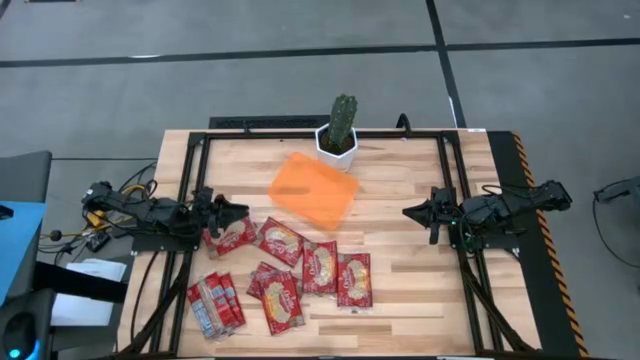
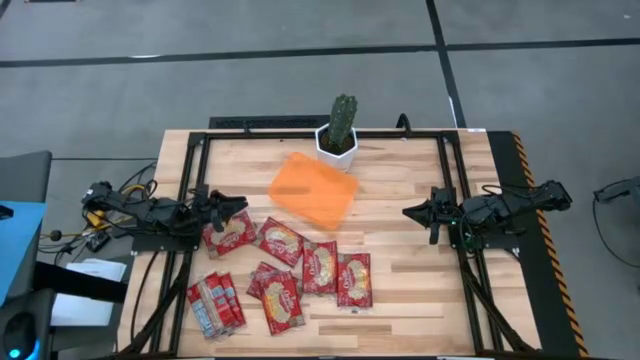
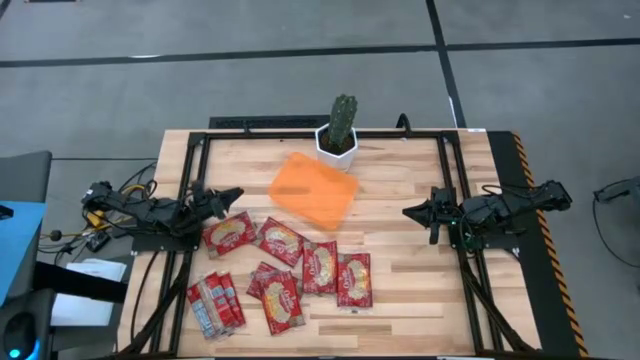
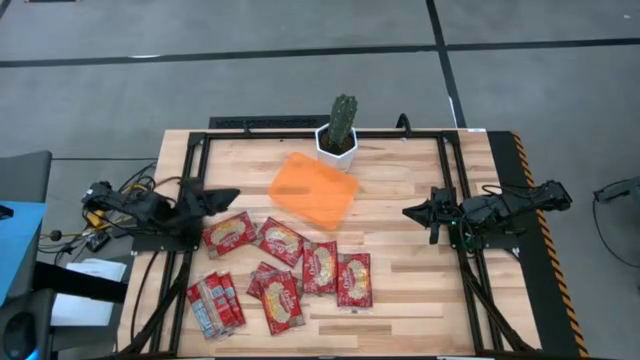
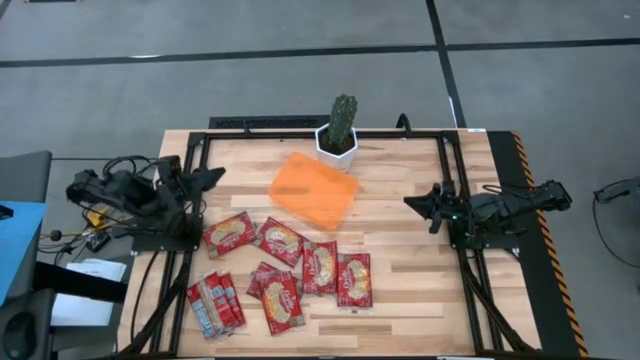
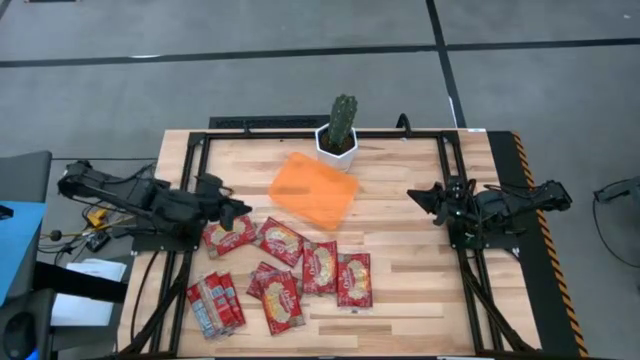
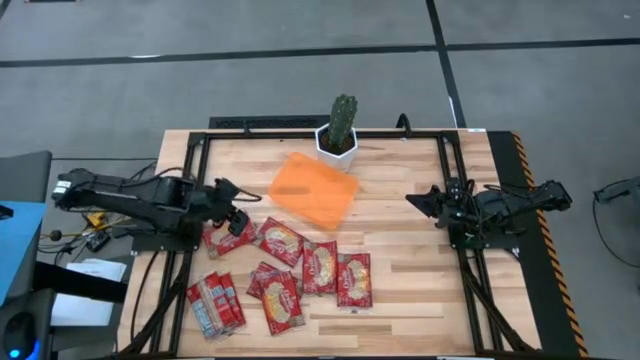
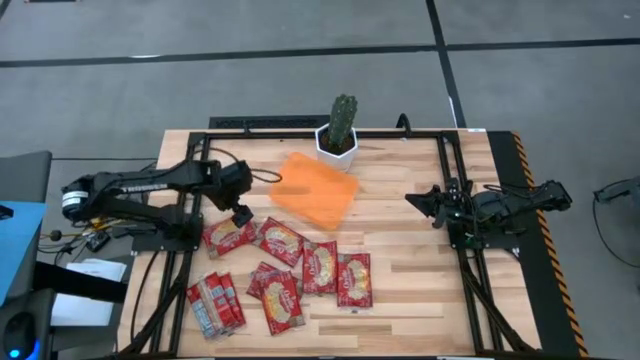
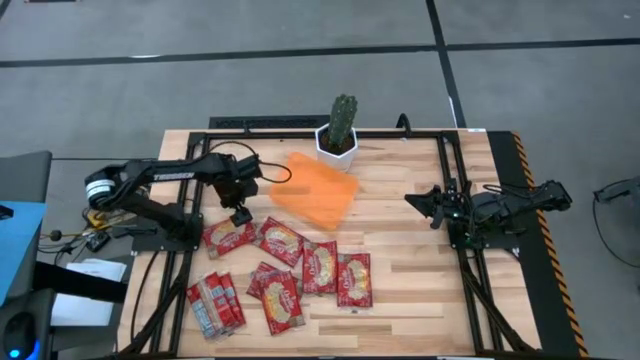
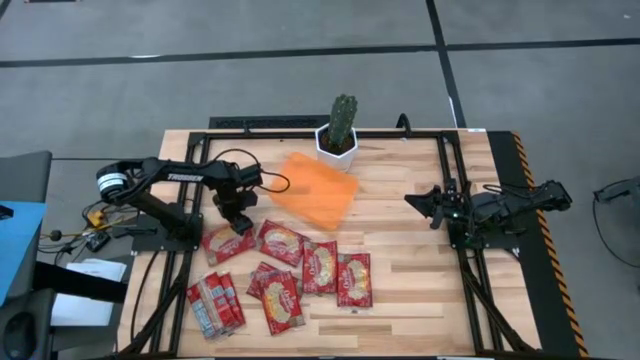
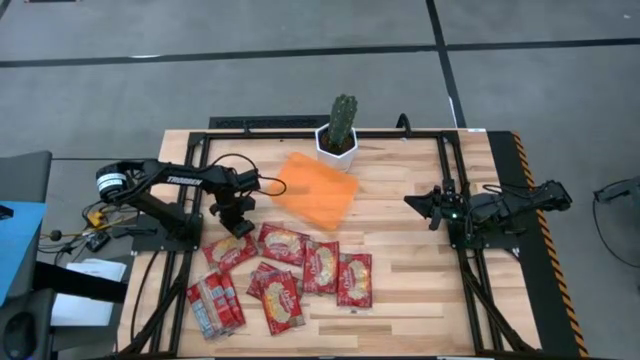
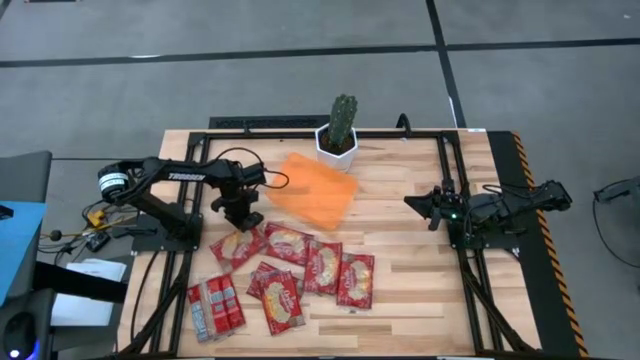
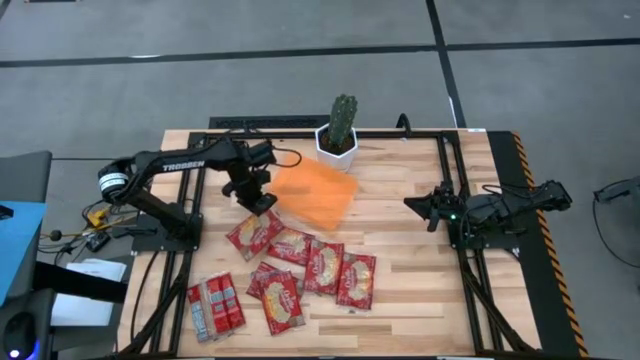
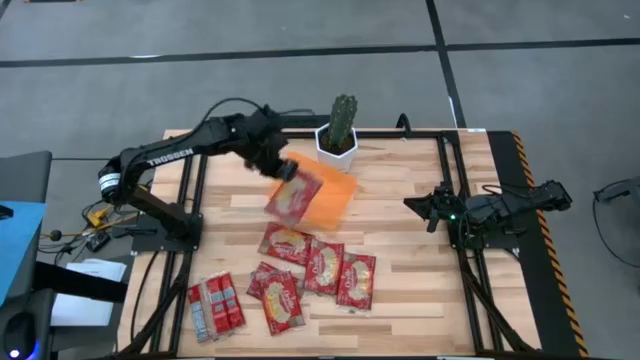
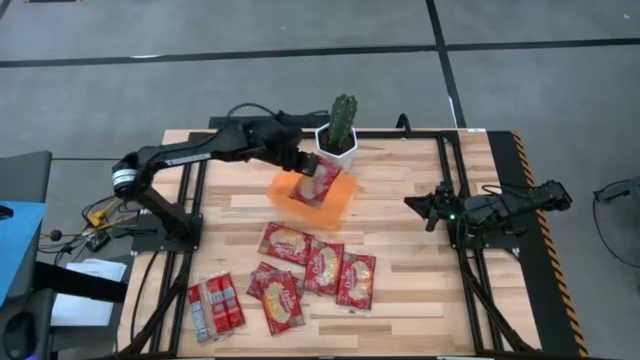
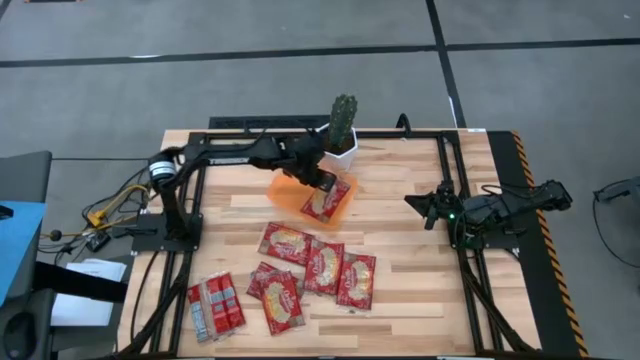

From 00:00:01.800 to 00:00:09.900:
Task: Sort popcorn bags into baskets
Put the popcorn bag into the bin

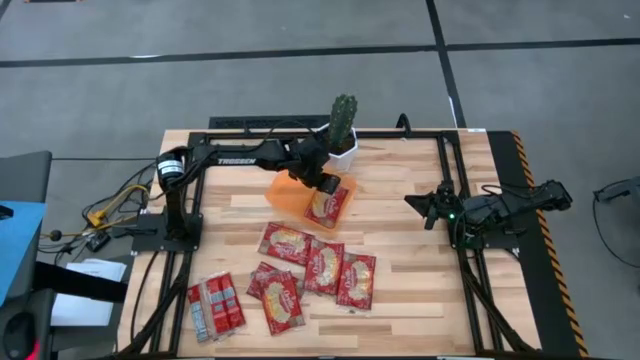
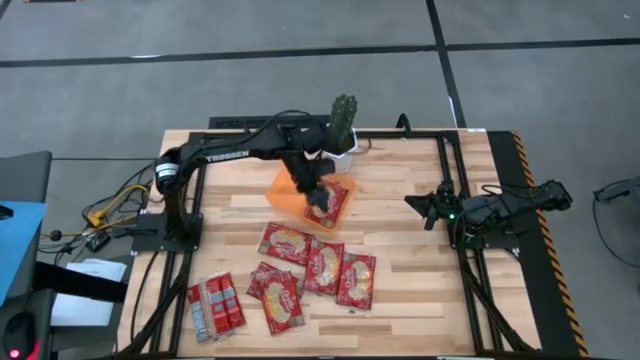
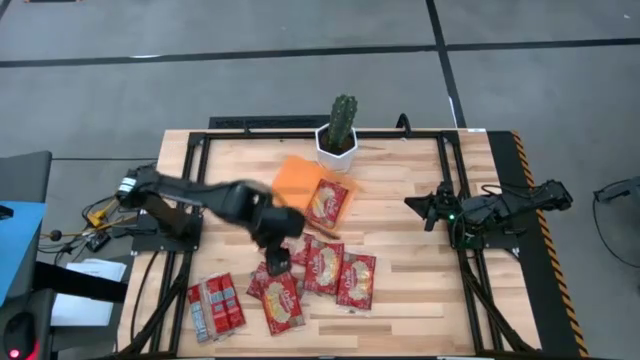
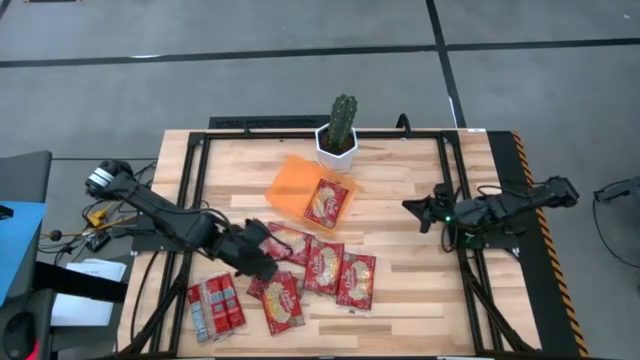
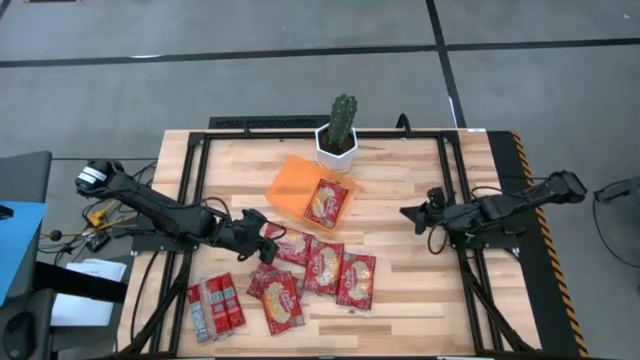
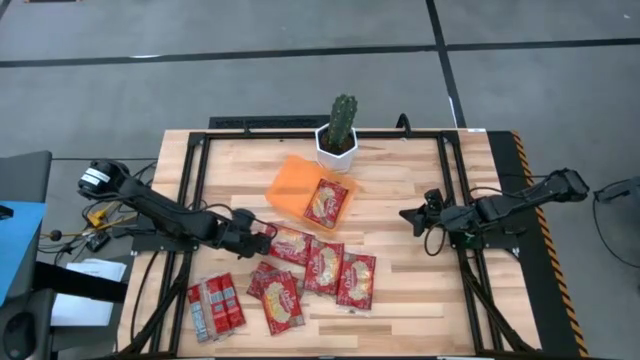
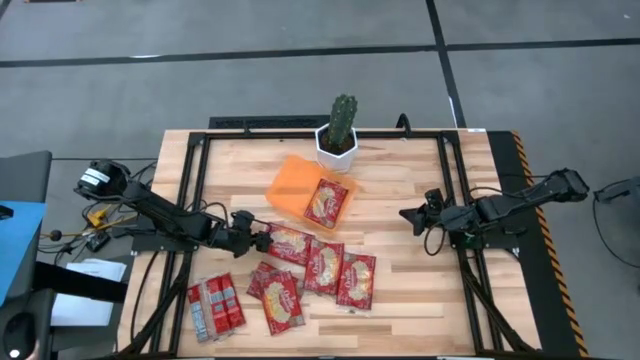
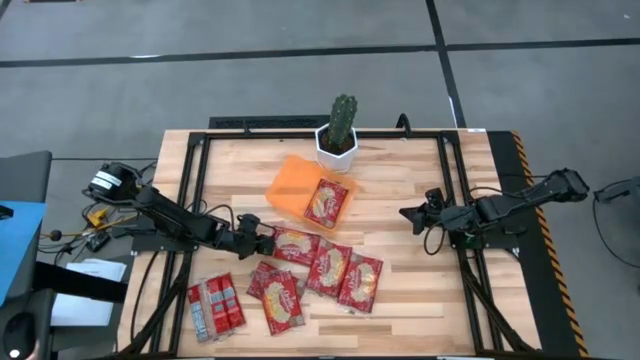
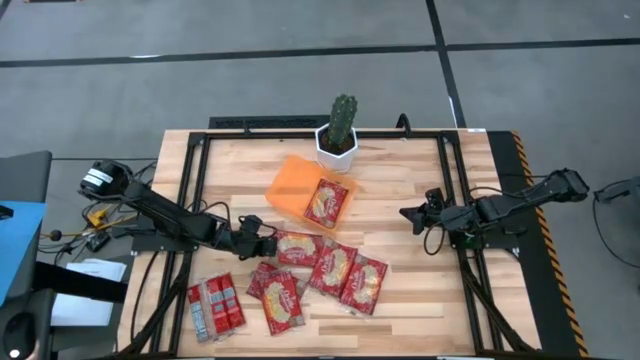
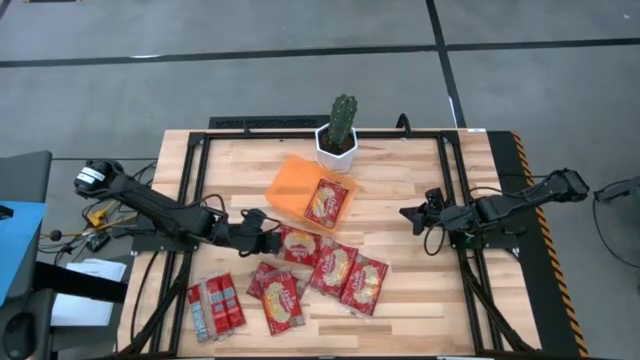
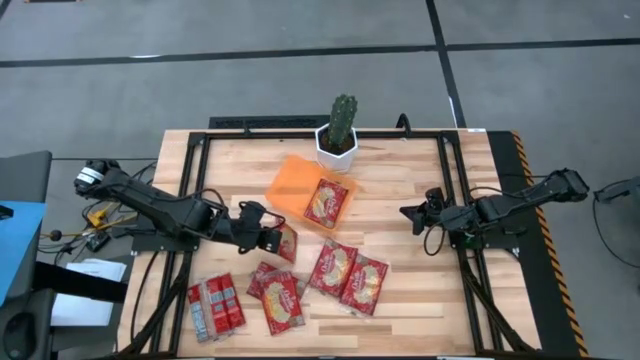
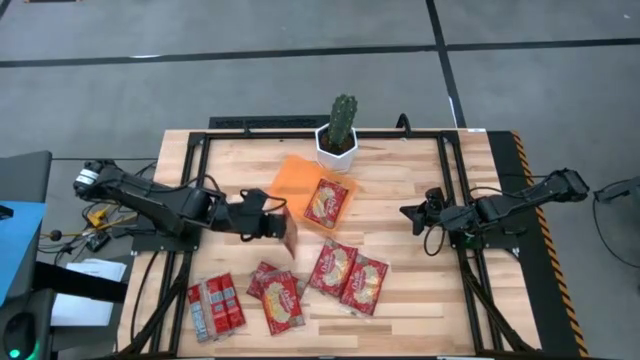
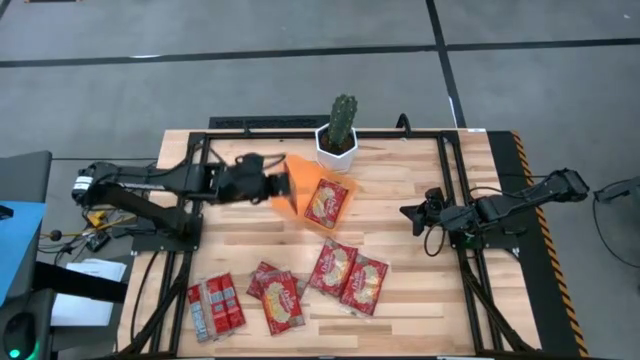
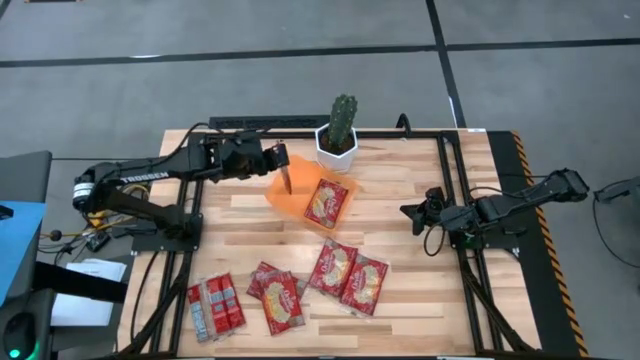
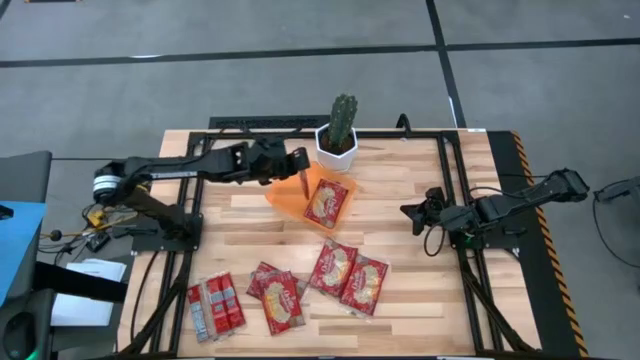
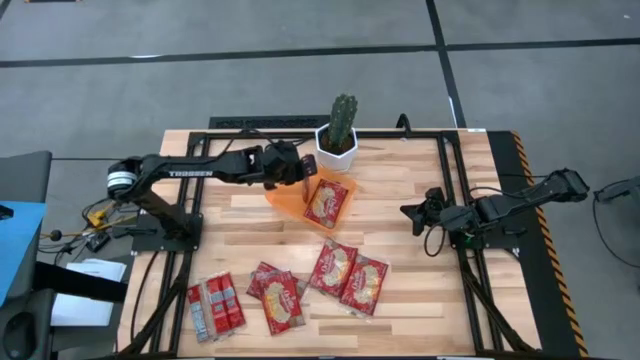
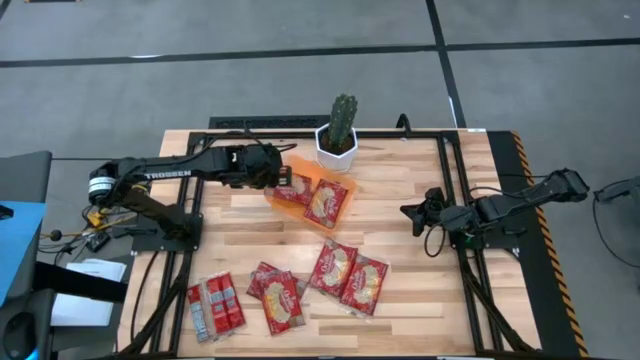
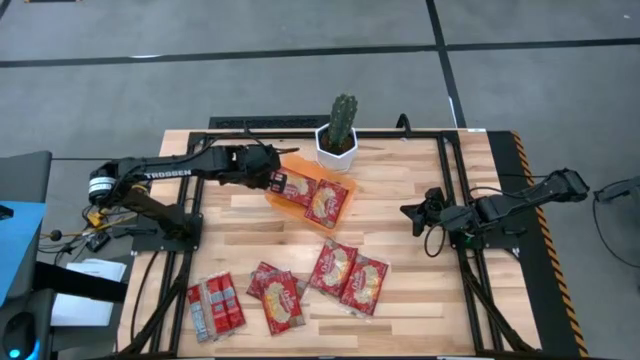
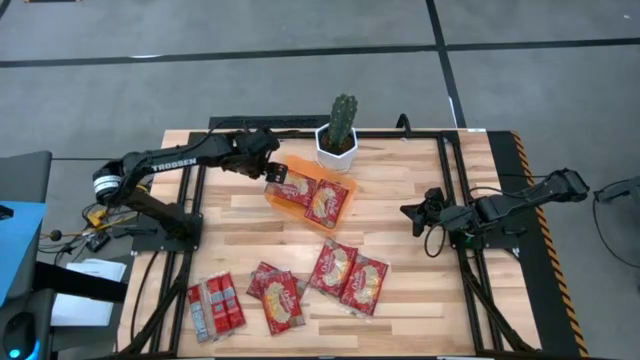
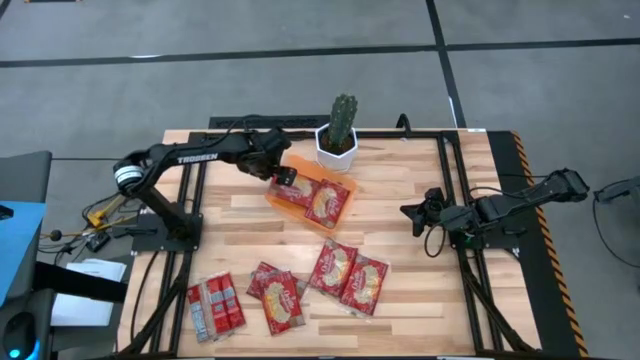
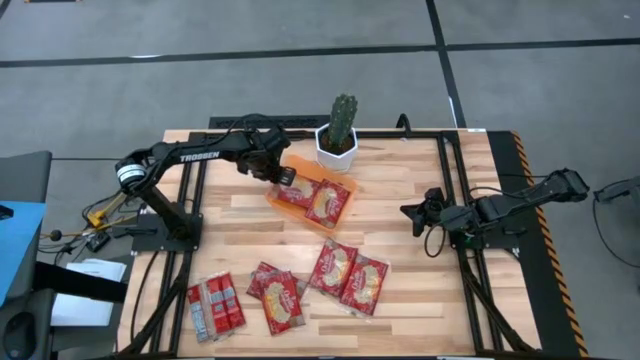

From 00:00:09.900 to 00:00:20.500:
Put the popcorn bag into the bin

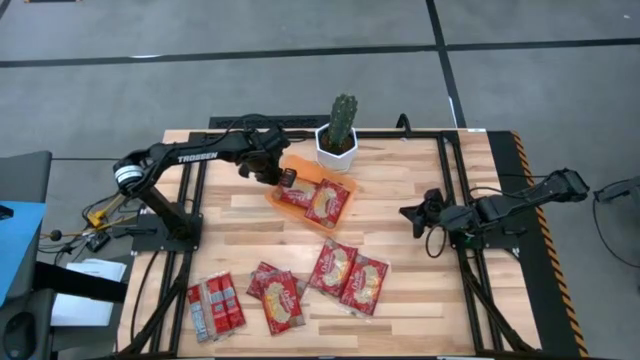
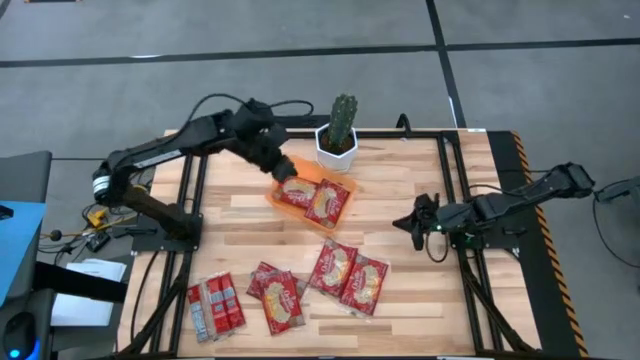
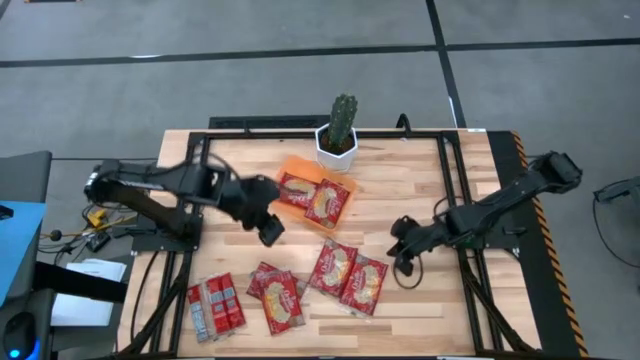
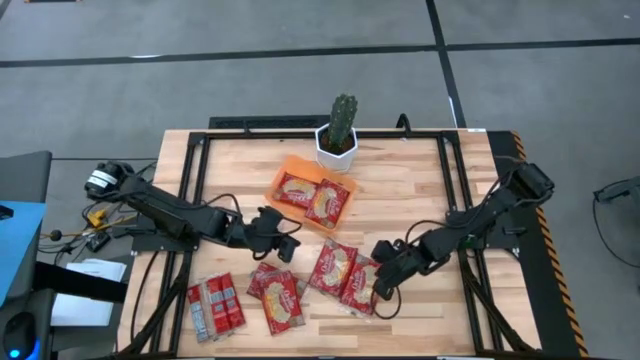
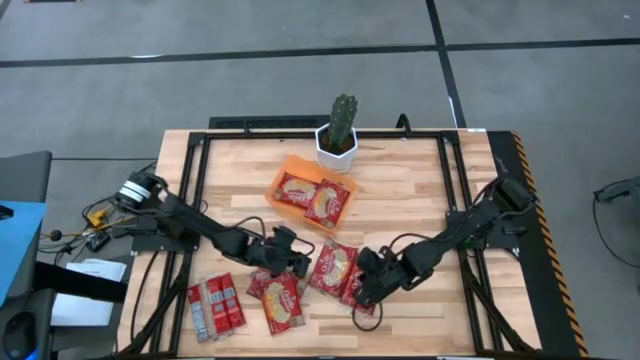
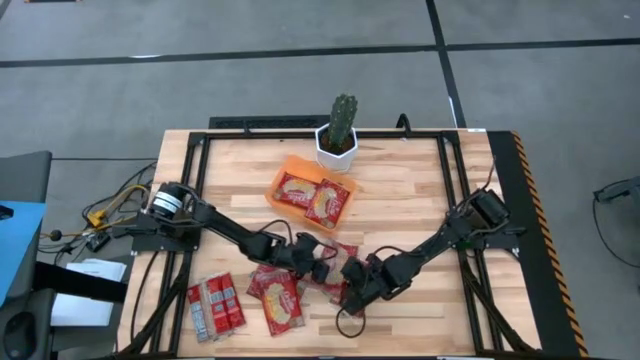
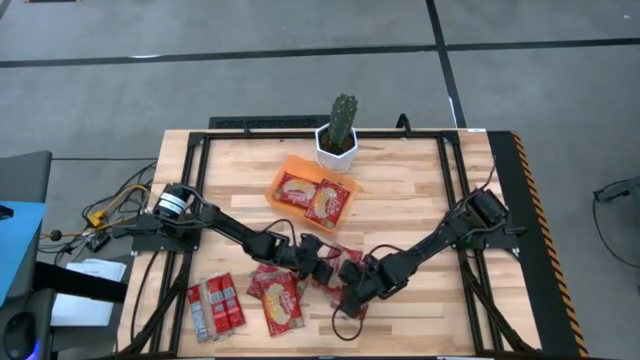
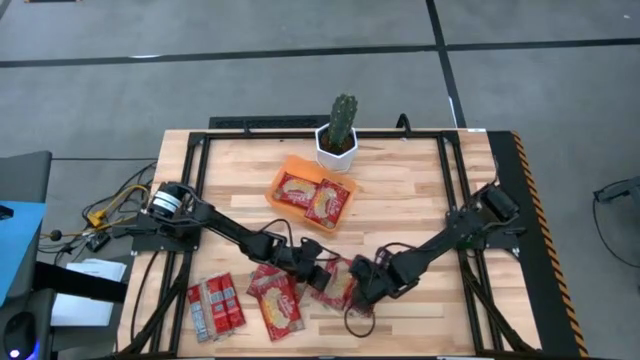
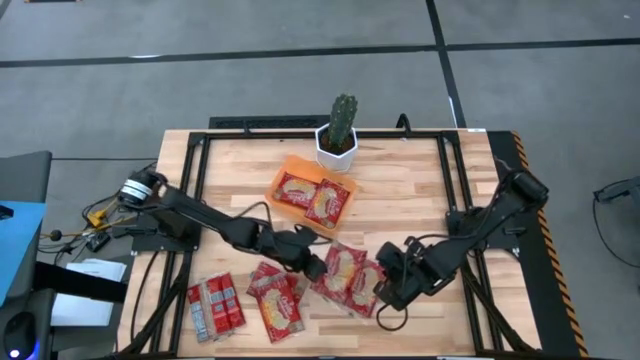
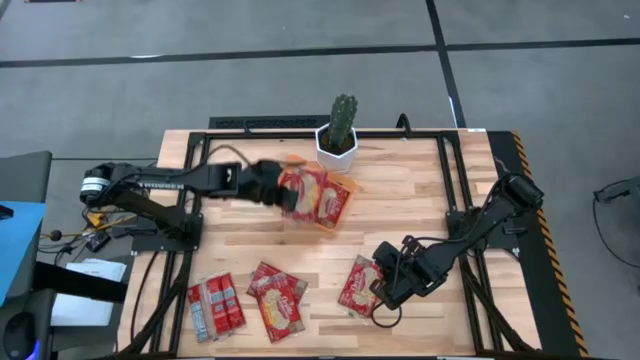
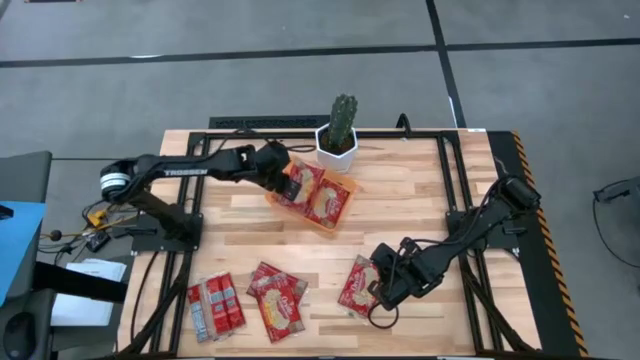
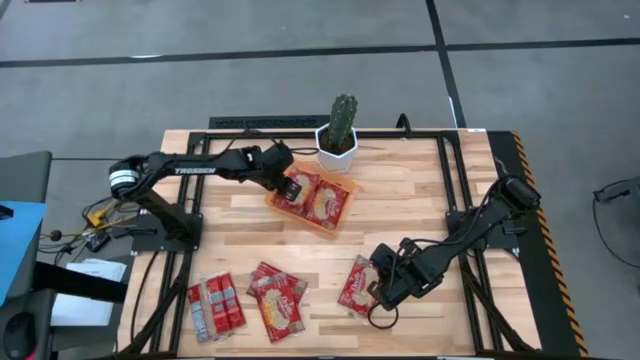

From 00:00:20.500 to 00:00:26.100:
Put the popcorn bag into the orange bin
